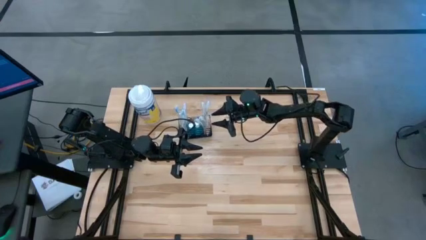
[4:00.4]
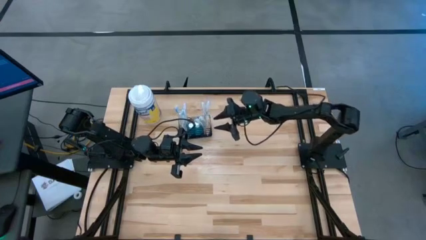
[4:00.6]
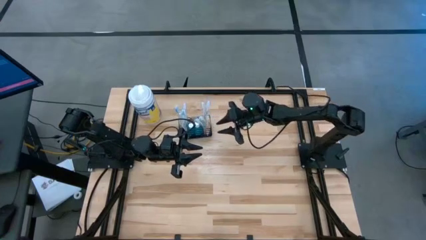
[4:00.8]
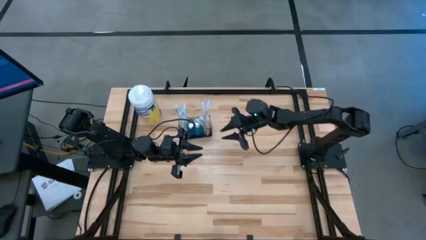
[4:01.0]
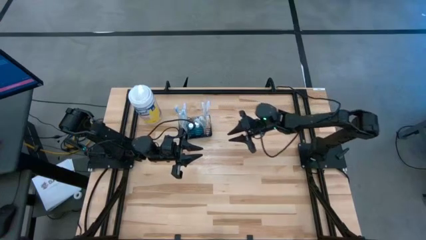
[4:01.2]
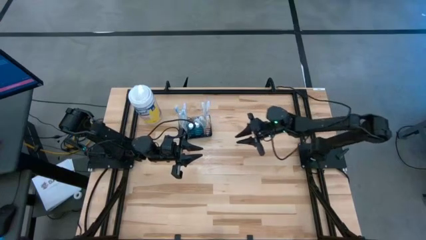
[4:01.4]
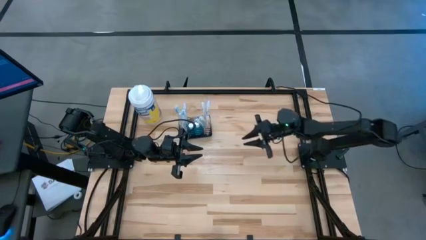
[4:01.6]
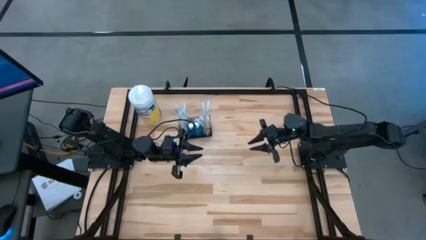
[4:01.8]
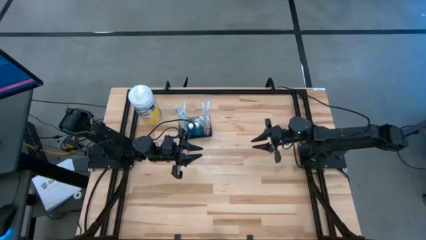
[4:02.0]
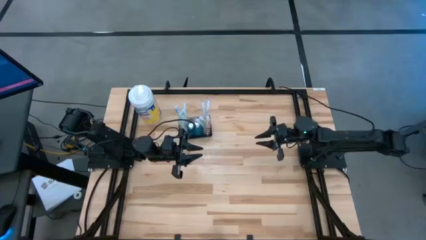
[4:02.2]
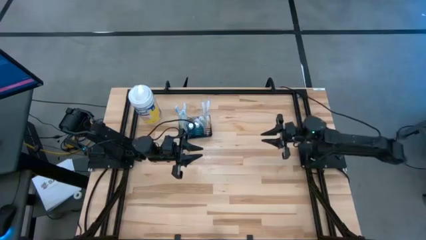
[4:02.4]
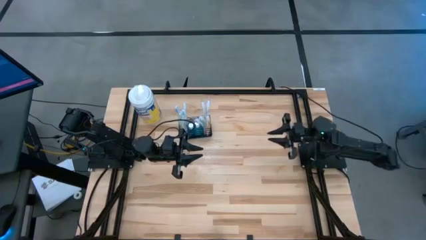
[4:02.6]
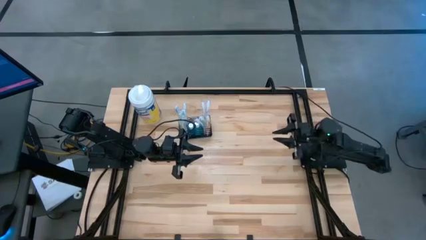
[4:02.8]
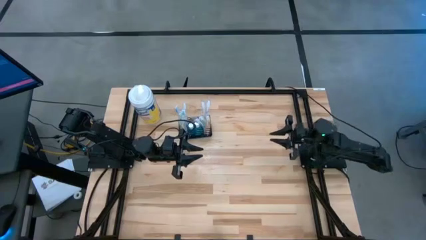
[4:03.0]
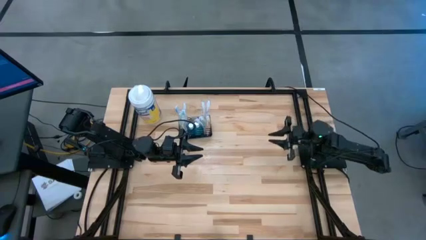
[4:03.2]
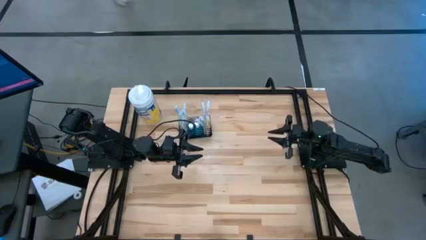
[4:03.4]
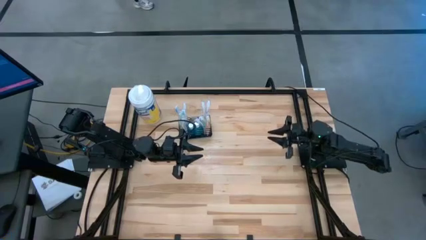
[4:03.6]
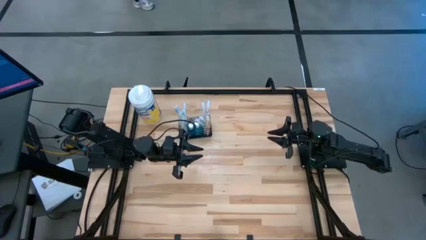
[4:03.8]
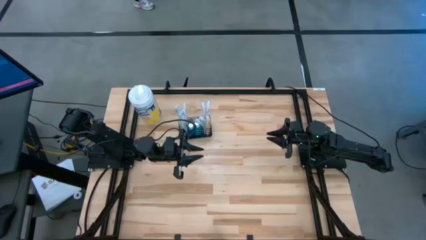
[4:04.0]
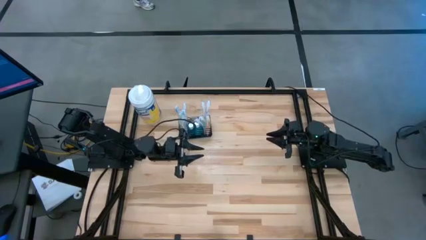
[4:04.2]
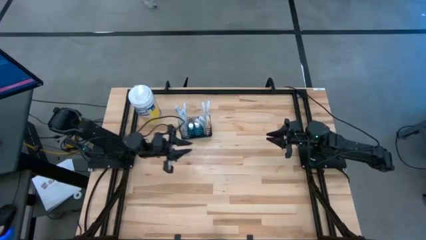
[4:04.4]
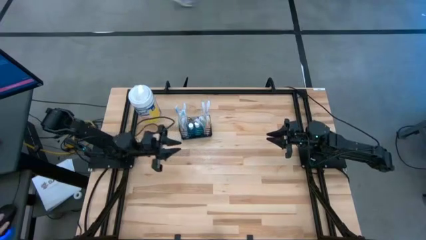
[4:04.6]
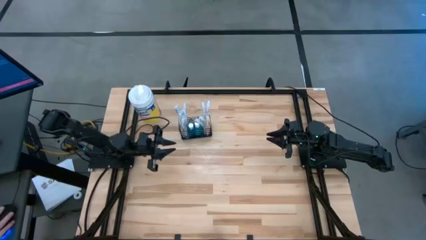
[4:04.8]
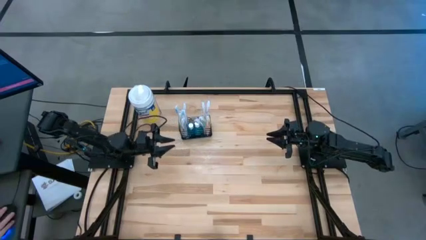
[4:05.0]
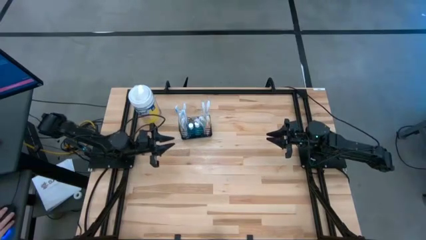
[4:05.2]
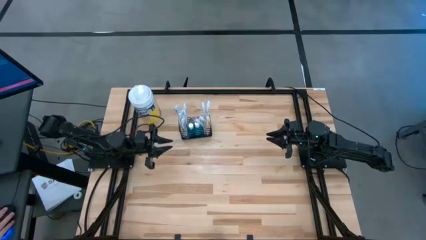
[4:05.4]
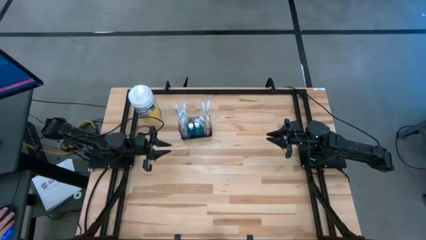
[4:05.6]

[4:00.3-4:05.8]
Task: Pick & Place toothbrushing station
Return to Home Position

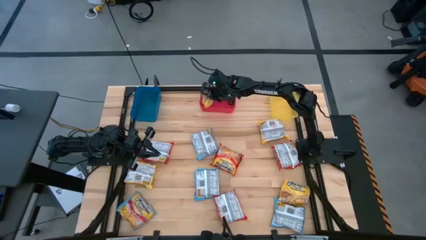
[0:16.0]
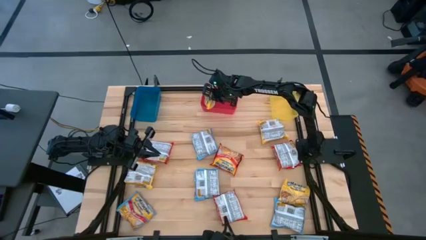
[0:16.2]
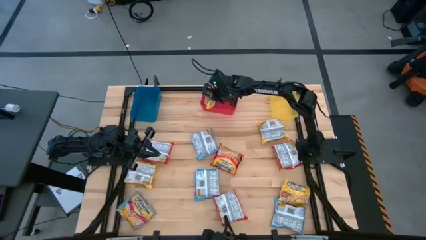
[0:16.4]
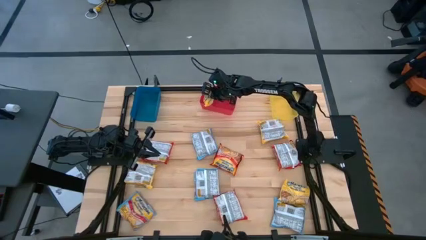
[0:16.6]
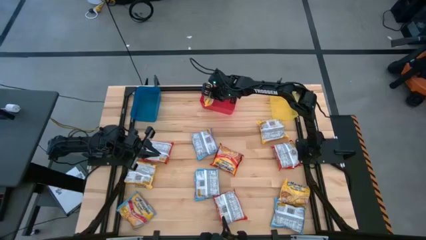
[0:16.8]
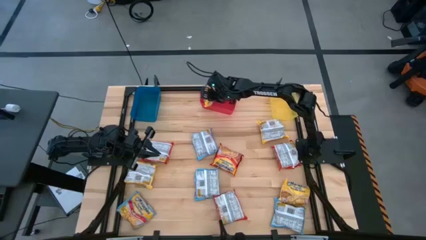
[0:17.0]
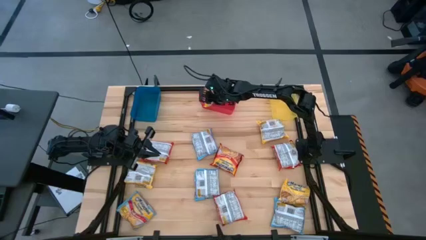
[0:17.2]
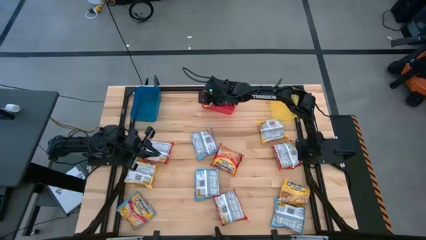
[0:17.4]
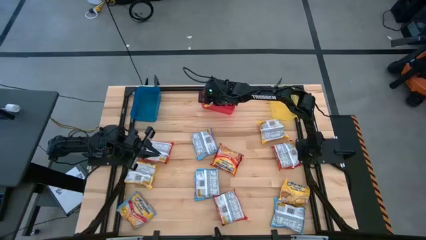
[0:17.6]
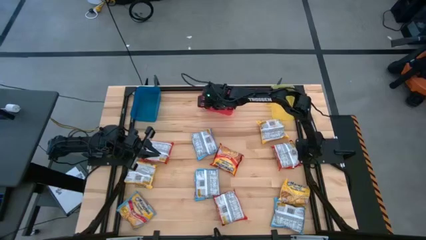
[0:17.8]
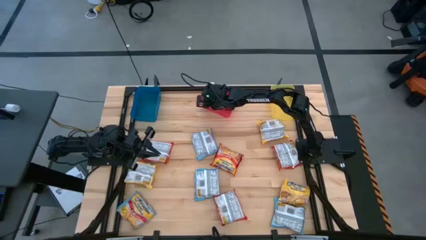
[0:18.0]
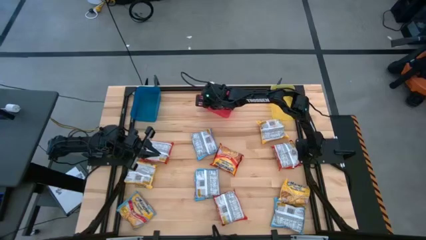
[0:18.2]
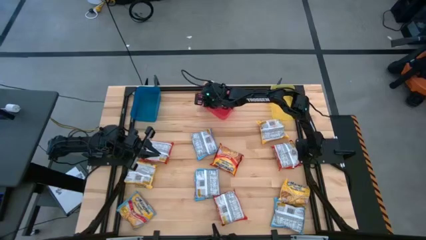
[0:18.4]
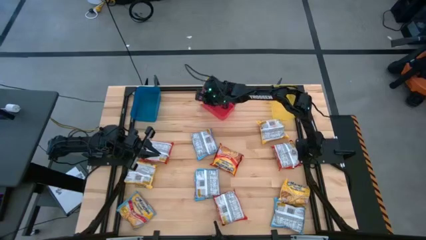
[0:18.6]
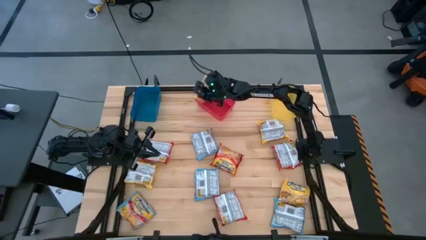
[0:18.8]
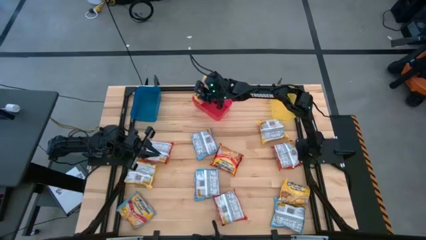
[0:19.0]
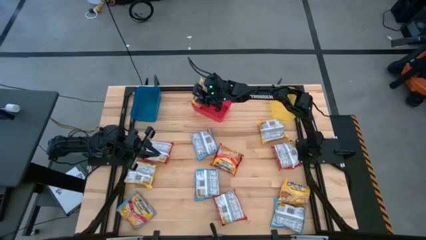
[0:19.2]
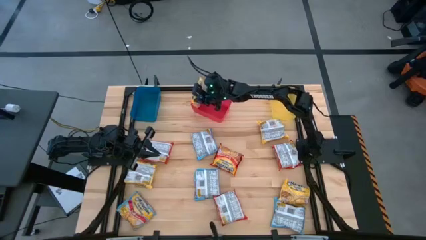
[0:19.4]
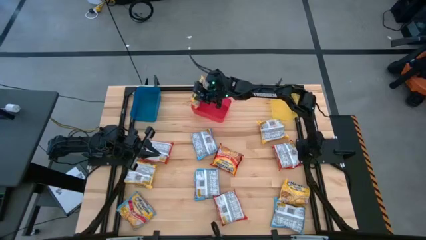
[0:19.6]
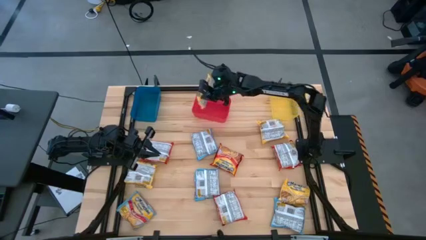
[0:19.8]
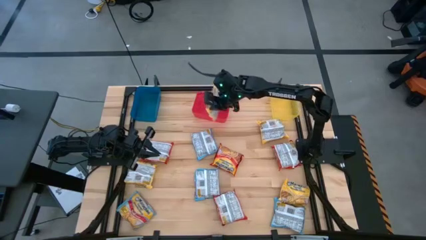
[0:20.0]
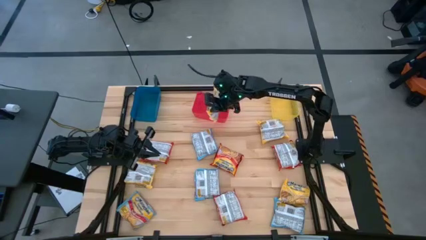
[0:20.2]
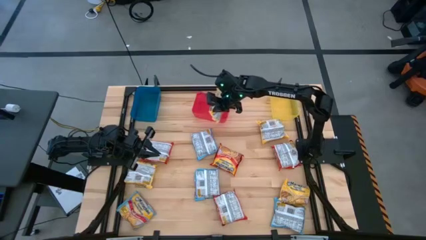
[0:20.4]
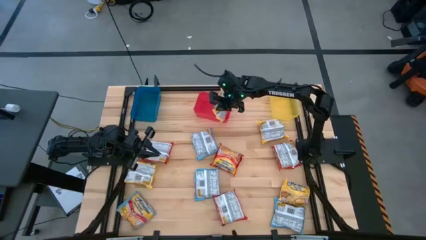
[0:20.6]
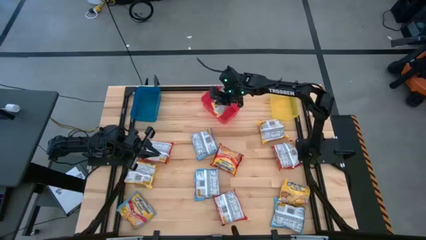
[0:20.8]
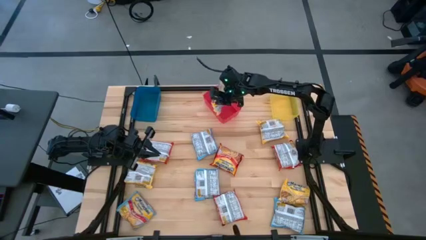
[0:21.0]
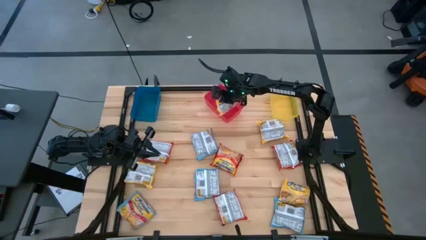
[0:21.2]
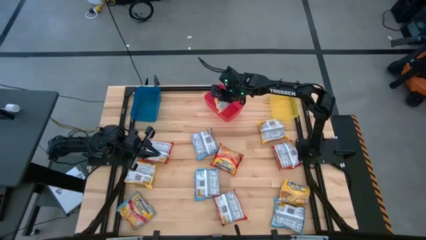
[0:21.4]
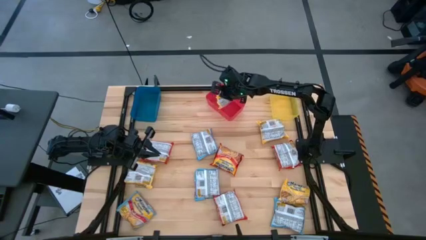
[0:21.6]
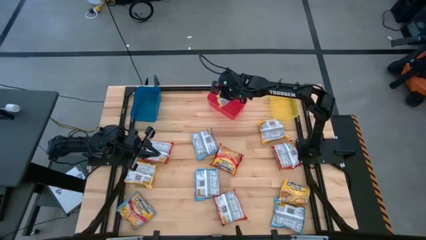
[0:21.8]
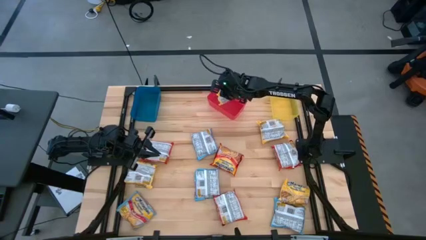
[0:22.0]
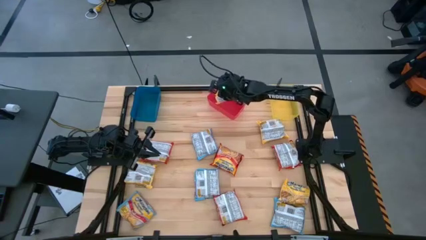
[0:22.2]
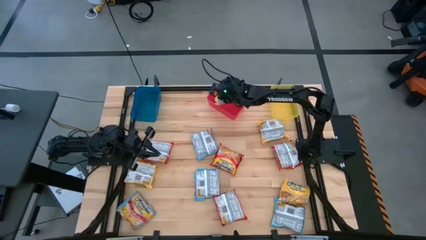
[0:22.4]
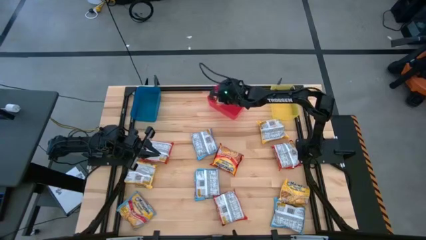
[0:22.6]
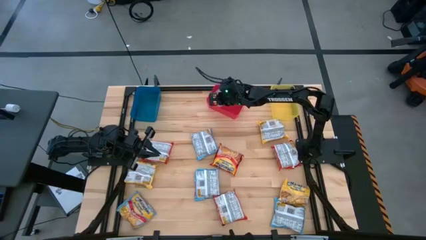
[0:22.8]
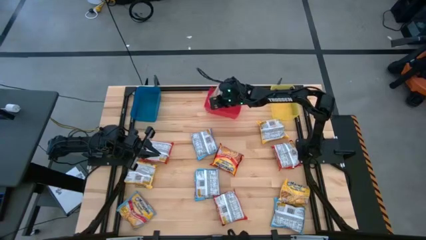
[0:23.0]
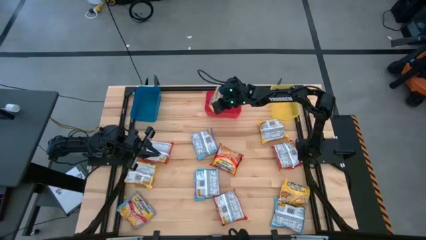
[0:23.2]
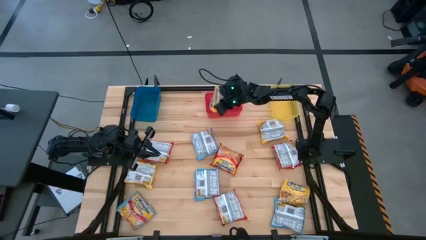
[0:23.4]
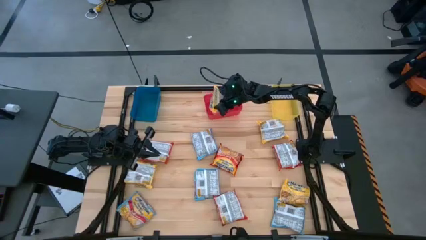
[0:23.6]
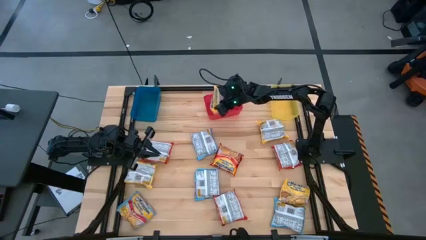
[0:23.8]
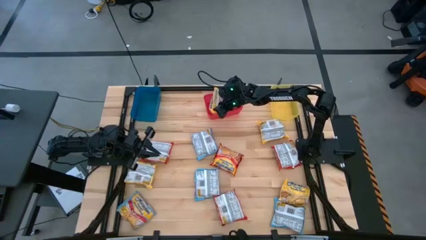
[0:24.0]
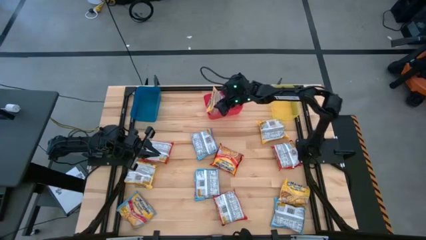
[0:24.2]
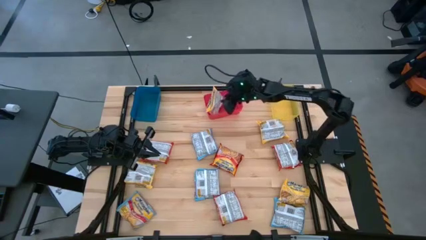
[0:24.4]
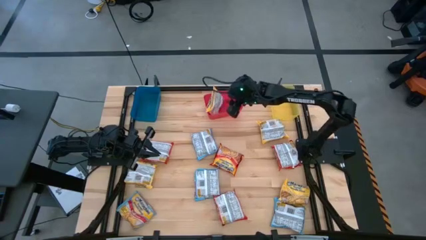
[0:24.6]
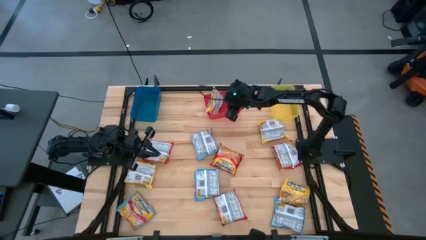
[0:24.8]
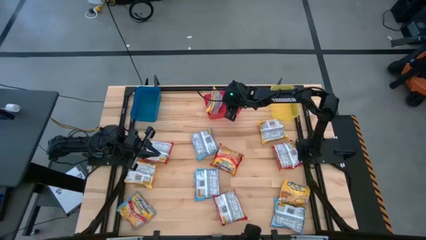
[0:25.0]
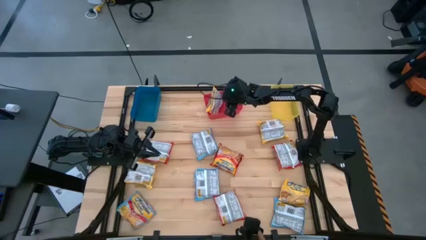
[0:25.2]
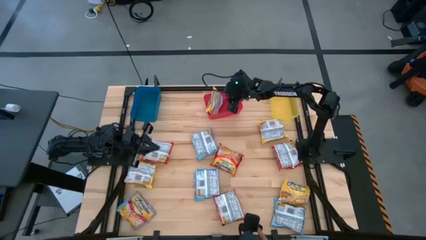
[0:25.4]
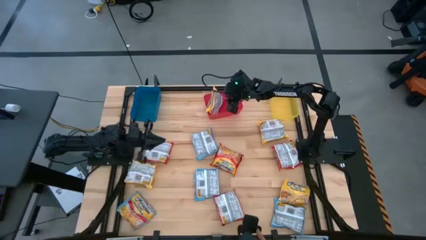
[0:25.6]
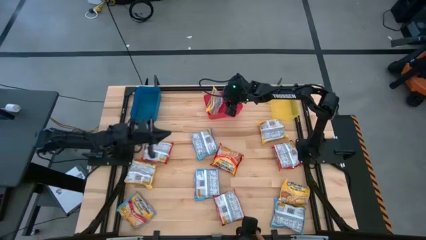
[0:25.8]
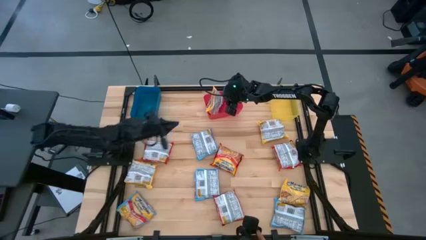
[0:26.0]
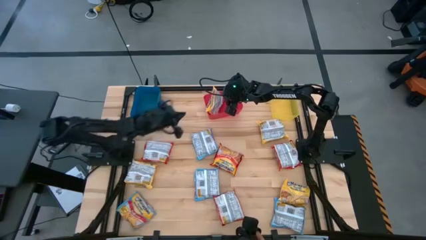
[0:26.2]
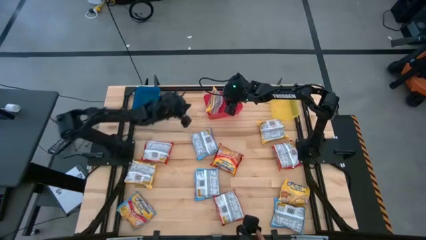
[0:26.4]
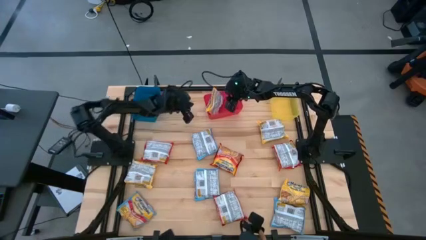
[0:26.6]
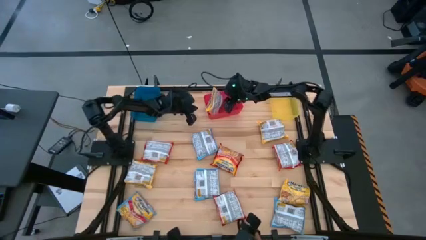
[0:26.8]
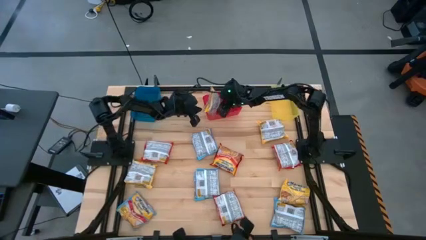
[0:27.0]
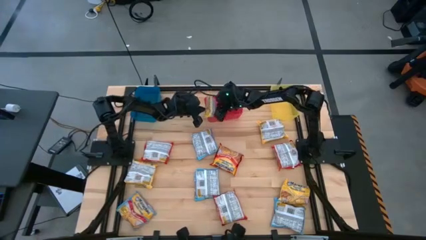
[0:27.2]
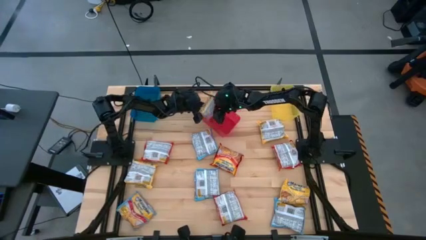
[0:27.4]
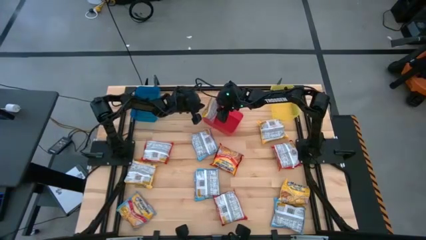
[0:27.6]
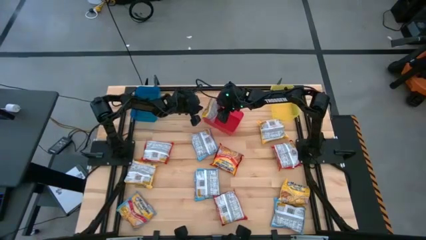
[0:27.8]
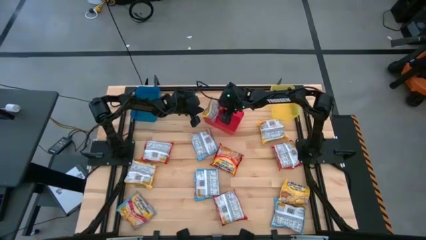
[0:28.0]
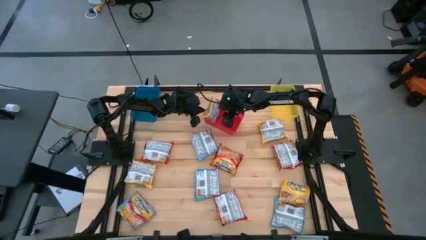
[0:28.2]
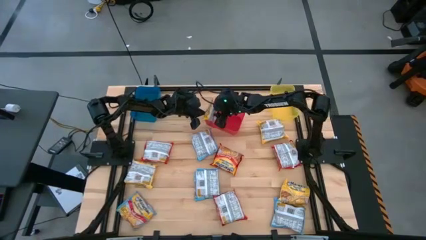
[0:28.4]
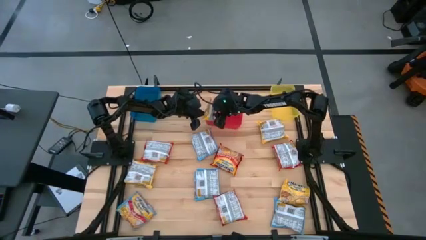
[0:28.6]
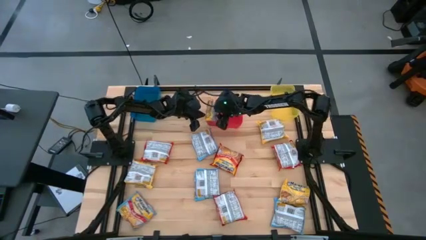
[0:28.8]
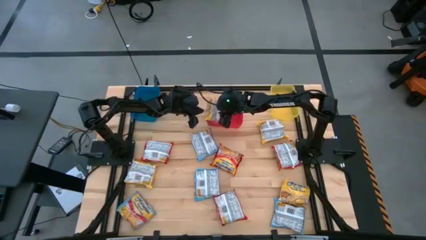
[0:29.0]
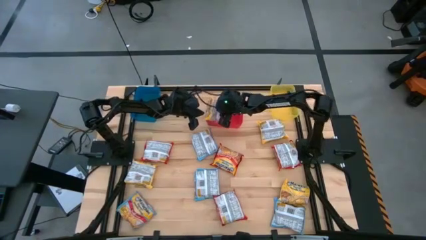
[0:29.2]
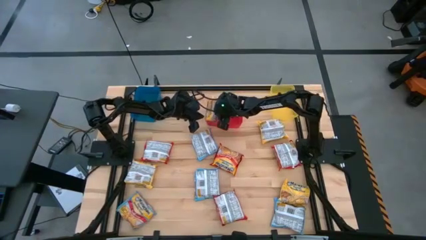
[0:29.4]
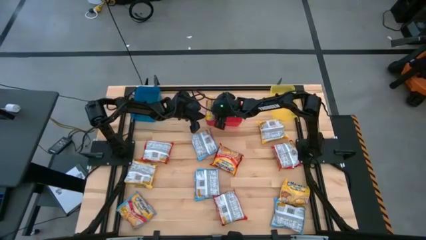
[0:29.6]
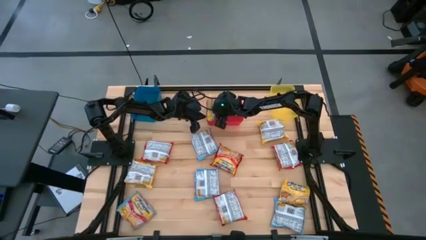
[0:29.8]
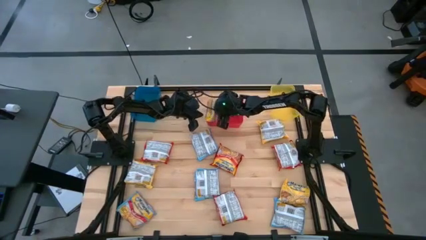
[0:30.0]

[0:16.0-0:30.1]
Task: Sort Maruchan noodles
Put the yellow noodle pack into the red bin
